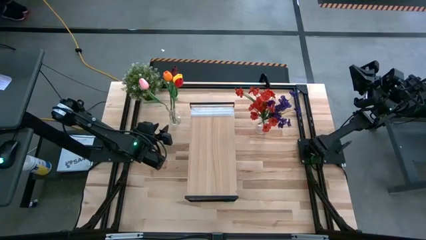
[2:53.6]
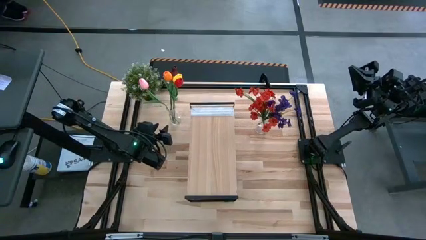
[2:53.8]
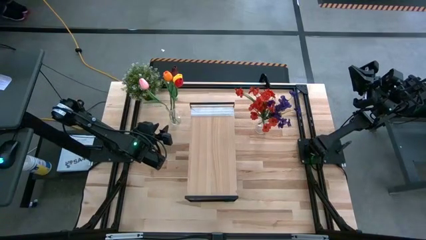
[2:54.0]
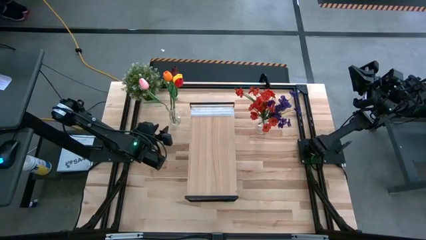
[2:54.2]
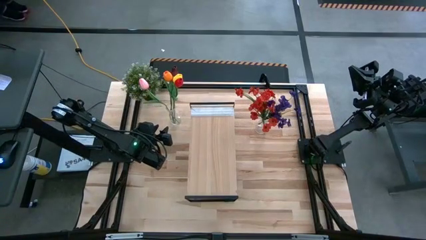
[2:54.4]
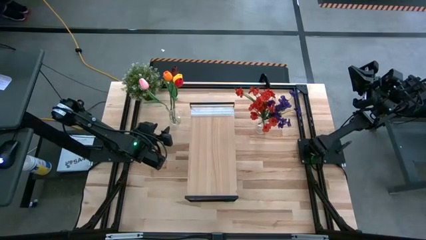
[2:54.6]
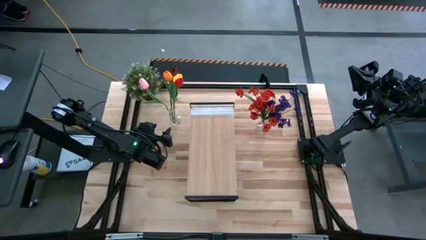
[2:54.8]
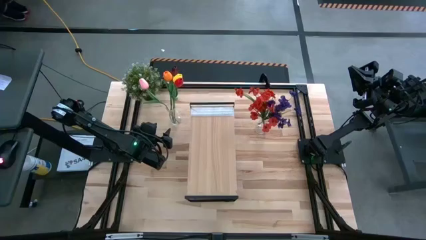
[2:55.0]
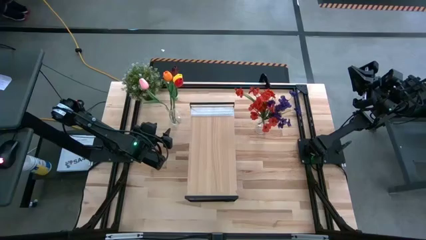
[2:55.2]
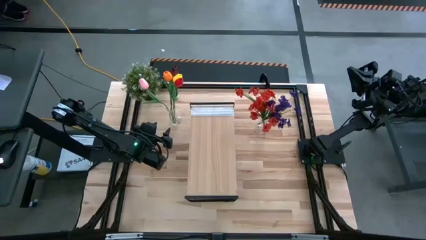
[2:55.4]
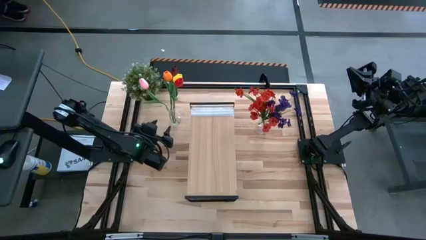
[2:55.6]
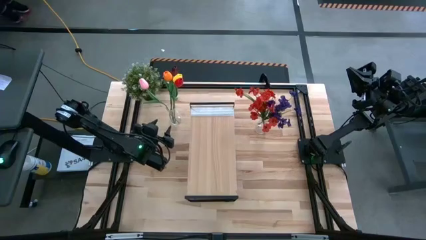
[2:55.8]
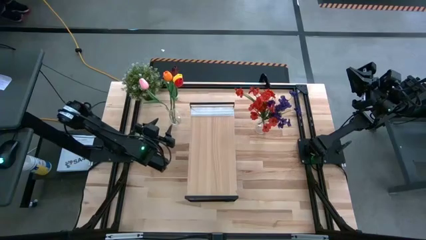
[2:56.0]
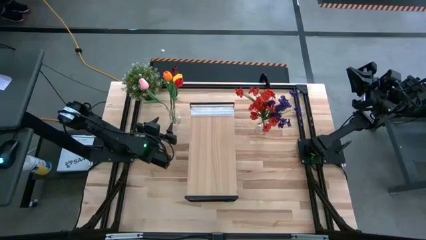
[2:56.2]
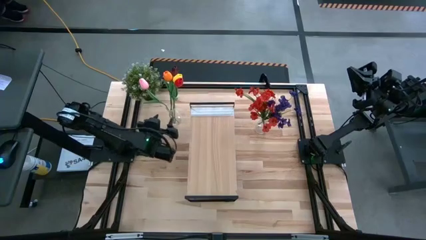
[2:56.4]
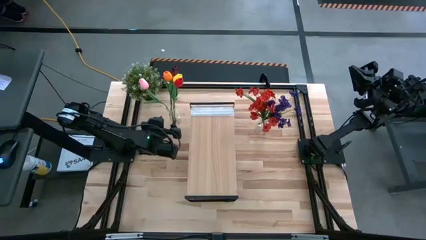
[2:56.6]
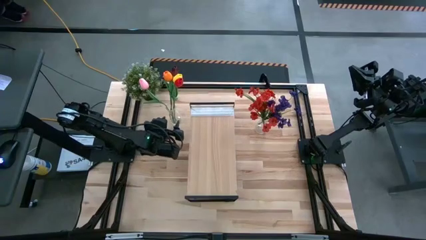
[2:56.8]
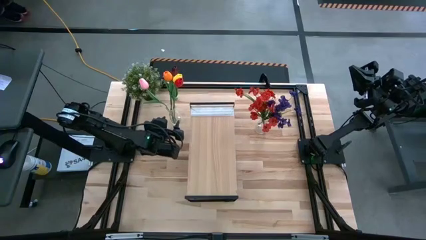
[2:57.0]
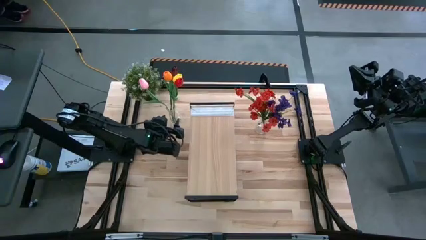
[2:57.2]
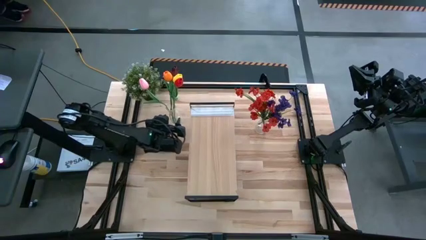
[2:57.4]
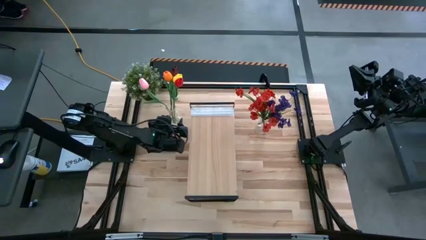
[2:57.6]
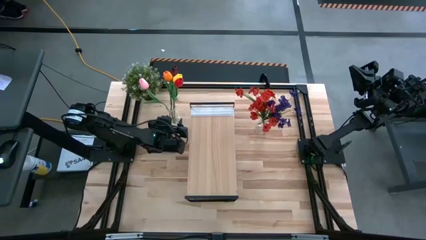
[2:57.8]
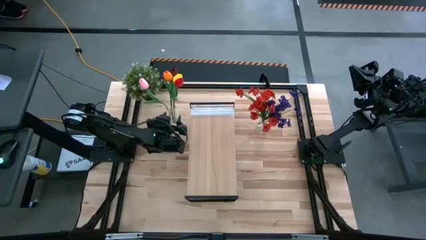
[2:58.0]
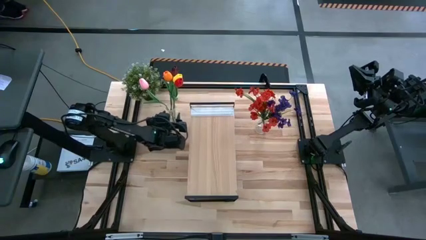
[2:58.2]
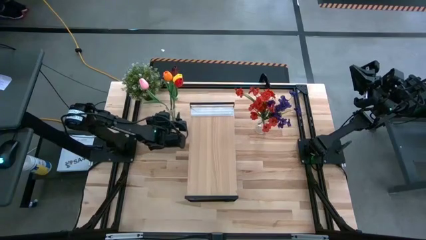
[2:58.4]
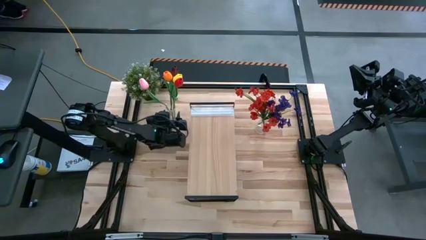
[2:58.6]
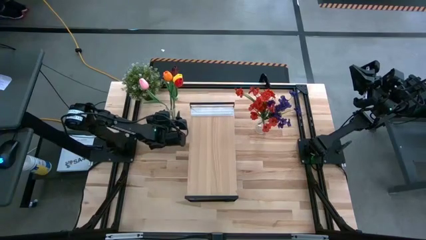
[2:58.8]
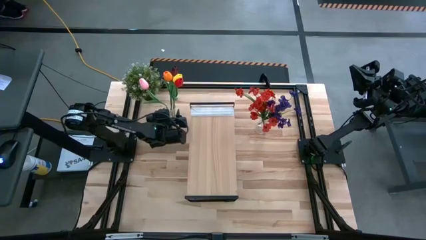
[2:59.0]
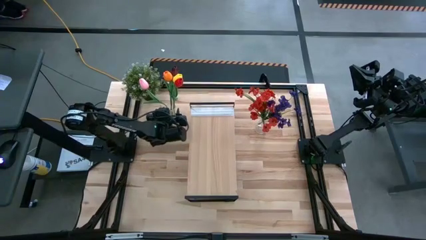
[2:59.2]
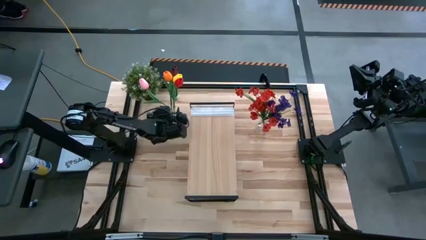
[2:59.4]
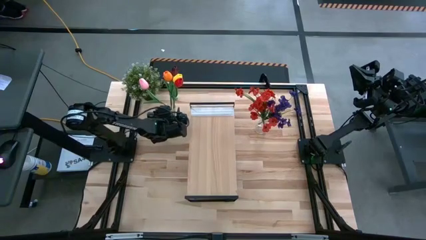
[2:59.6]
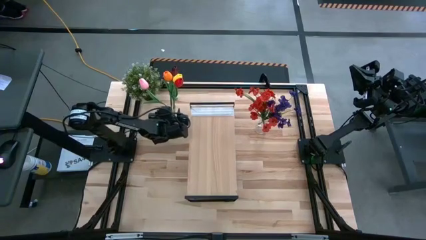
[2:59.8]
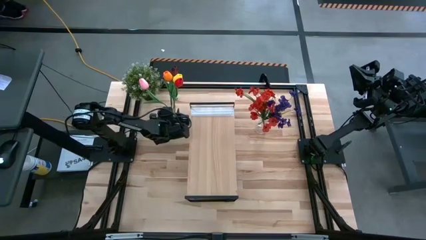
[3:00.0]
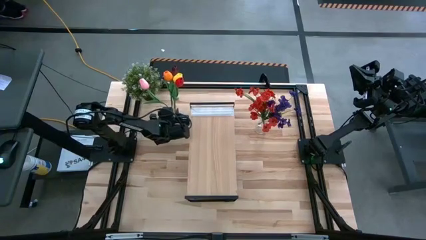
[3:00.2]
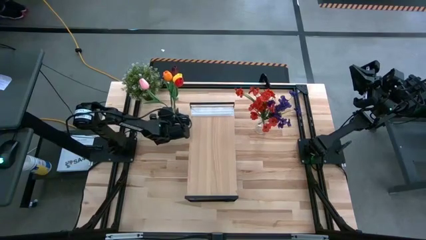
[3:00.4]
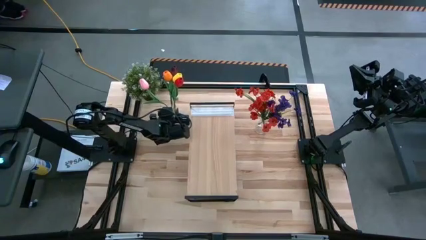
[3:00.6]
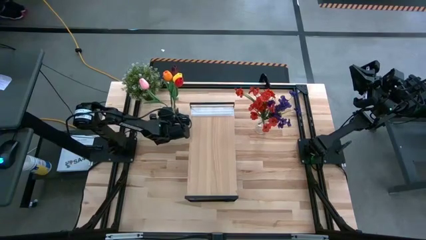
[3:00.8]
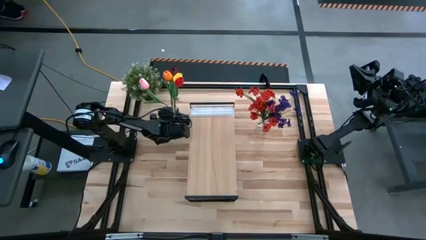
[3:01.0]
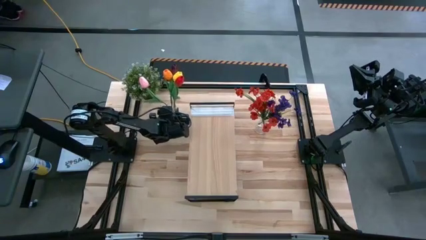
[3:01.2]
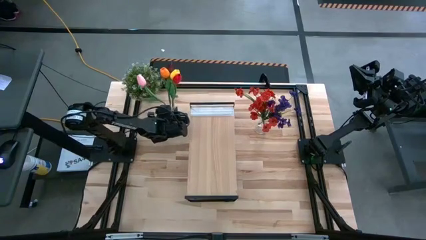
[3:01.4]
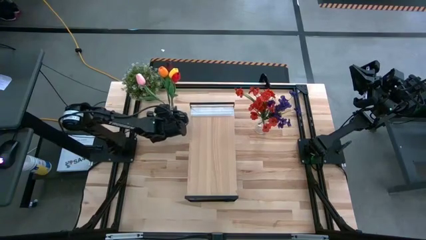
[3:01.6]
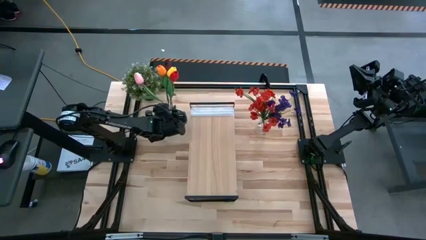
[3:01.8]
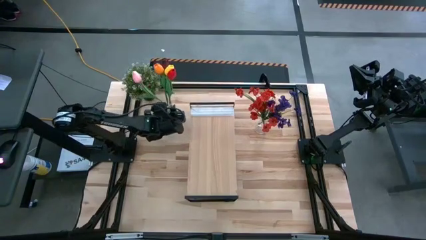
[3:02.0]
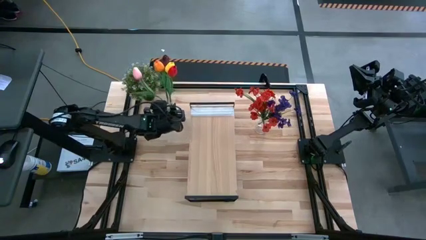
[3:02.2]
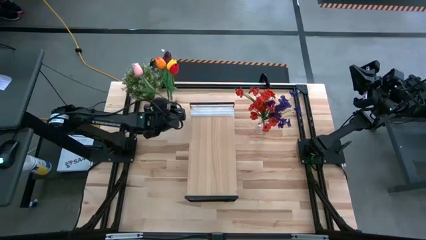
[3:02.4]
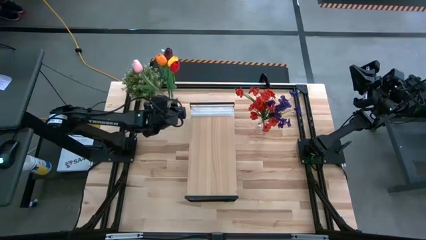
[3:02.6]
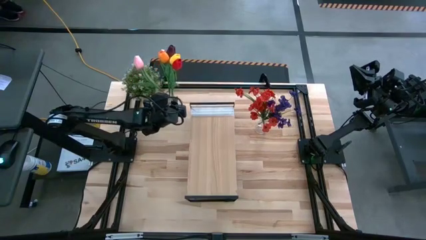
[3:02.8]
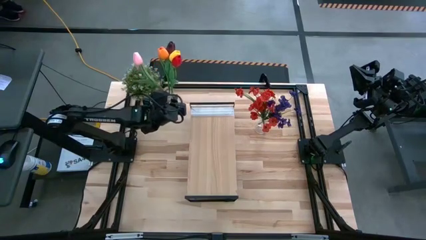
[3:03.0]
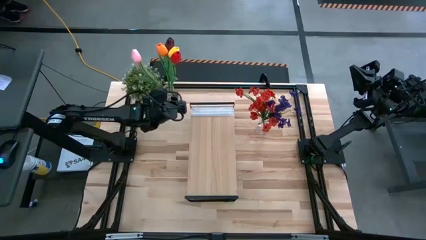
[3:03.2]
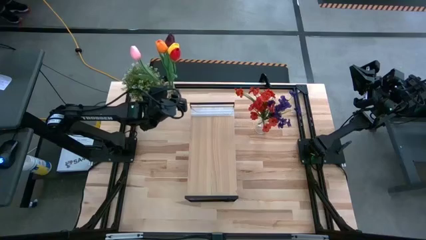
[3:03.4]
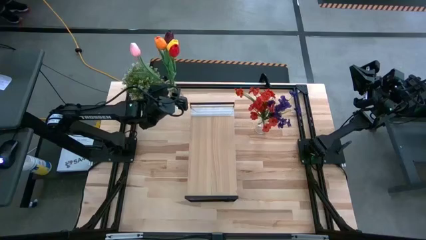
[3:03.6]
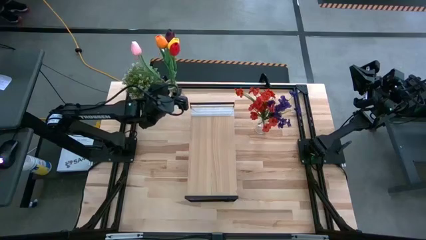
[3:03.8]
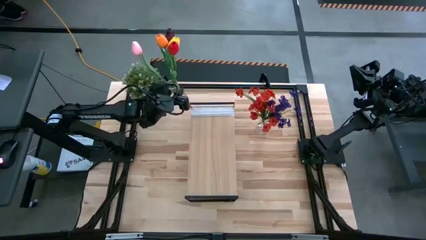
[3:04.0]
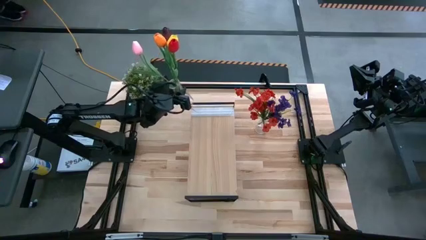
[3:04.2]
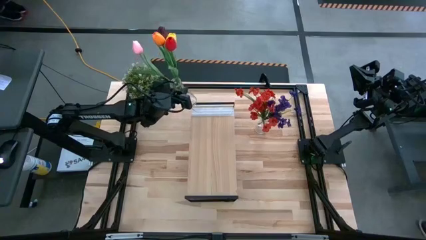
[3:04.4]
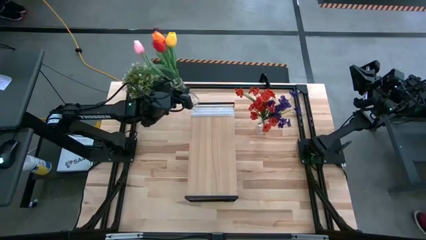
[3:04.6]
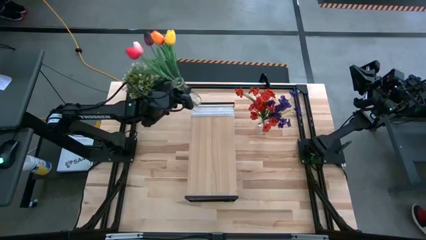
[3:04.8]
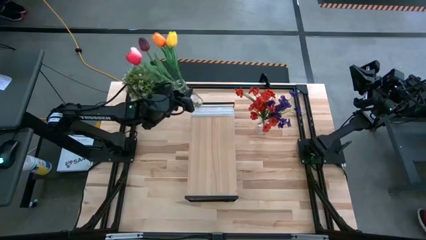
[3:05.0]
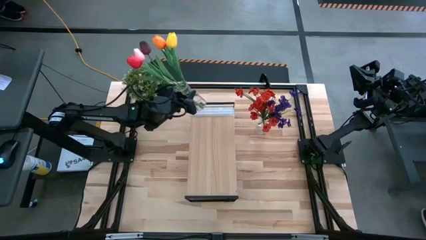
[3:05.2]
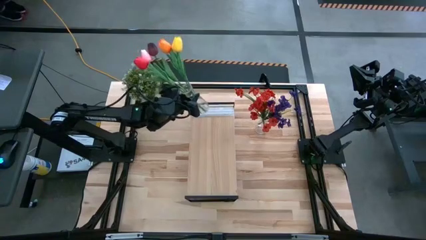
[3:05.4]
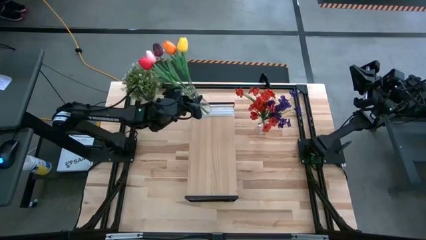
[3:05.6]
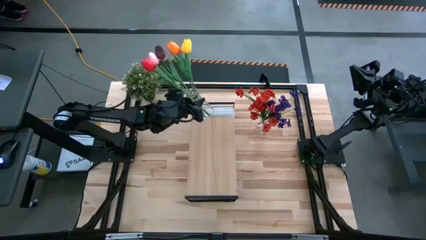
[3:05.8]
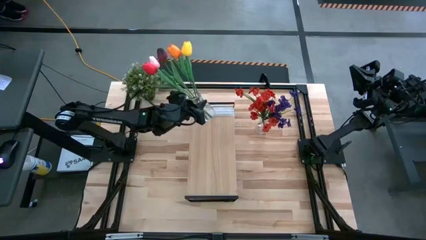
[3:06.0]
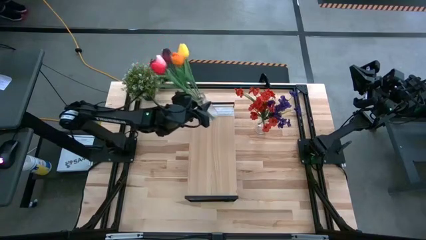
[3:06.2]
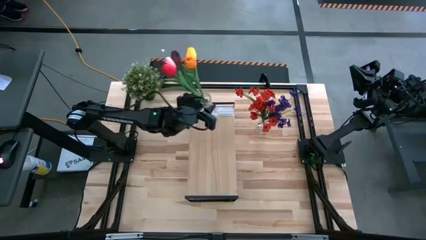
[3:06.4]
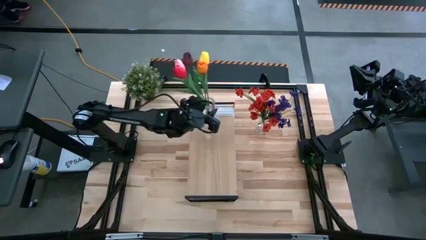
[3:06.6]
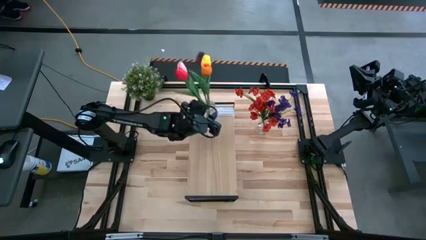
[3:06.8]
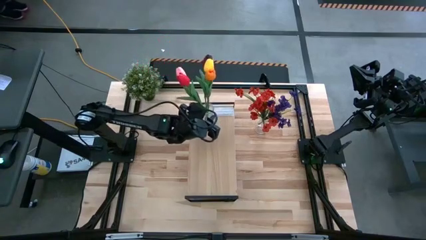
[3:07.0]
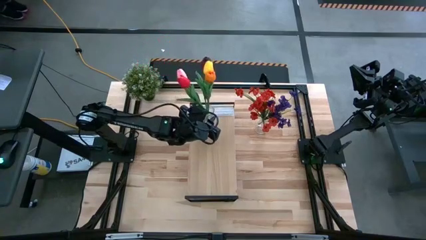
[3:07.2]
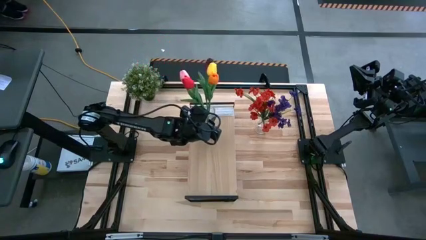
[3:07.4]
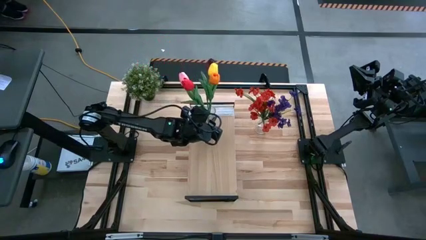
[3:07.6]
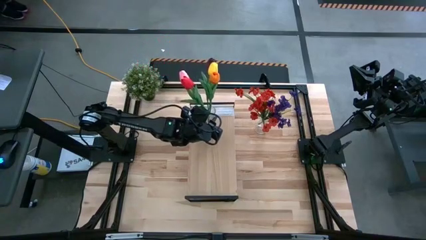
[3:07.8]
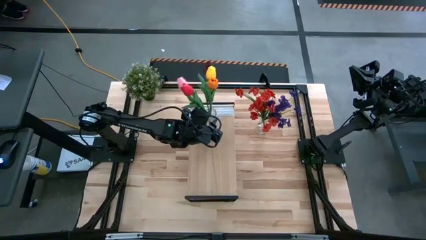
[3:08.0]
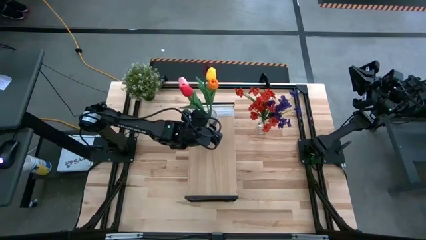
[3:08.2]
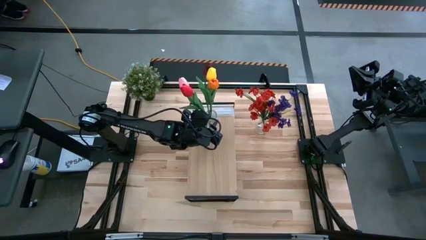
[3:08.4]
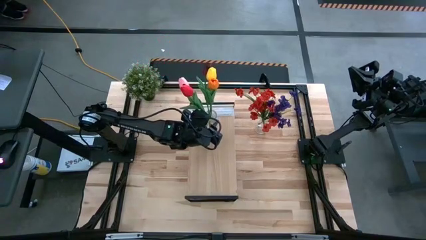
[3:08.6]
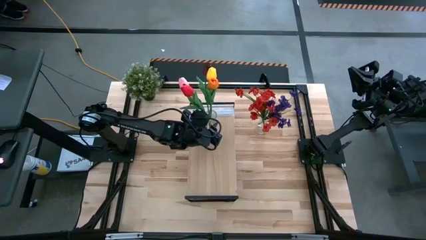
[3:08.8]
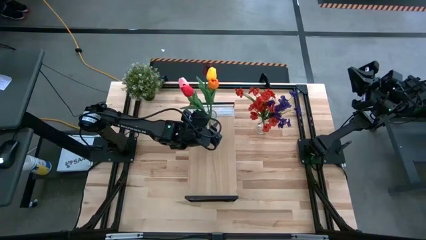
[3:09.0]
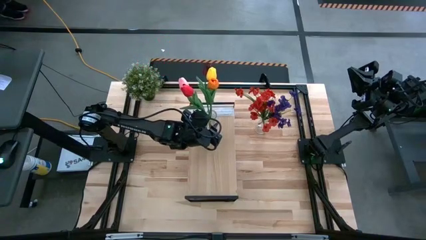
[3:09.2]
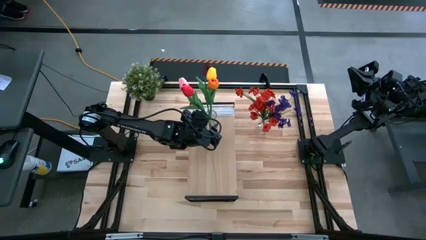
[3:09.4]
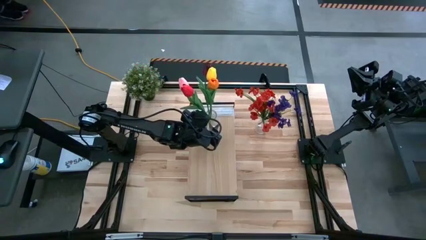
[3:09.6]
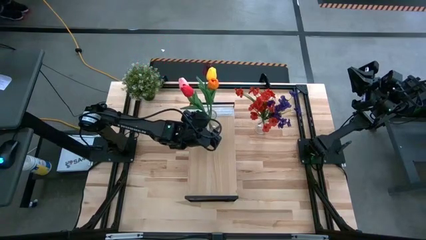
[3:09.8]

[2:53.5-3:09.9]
Task: Pick and place flowers into a vace then onto a shelf
Put the left transparent vase with tulips on the shelf
